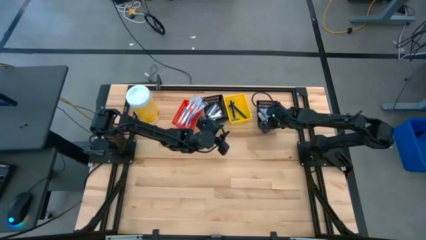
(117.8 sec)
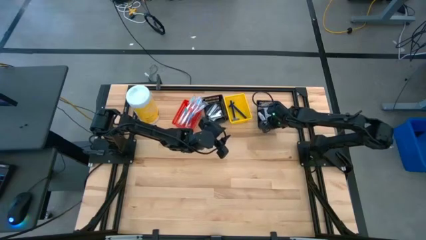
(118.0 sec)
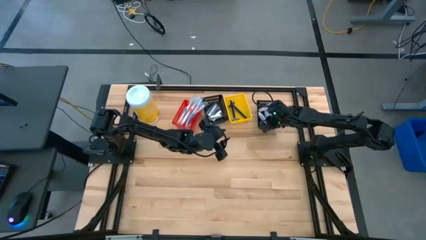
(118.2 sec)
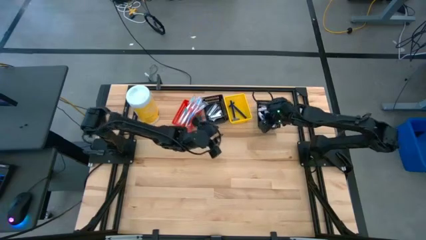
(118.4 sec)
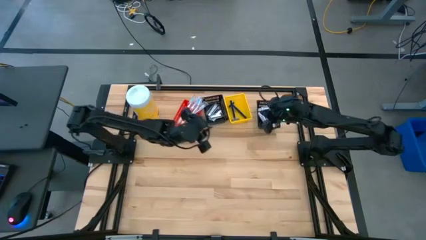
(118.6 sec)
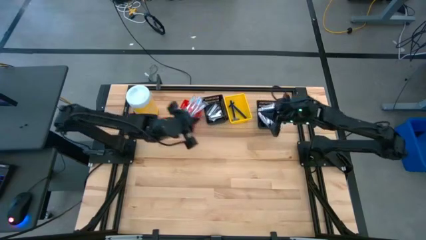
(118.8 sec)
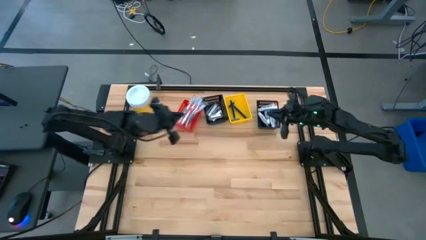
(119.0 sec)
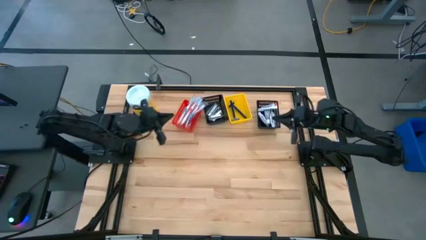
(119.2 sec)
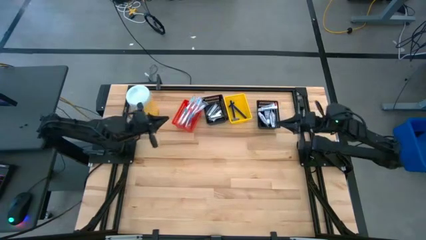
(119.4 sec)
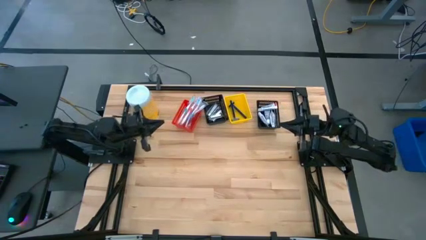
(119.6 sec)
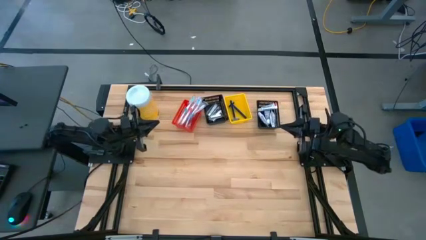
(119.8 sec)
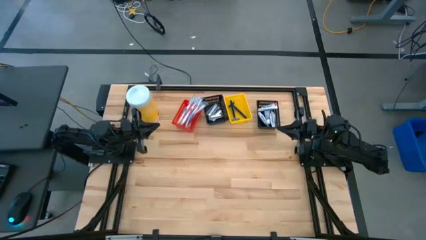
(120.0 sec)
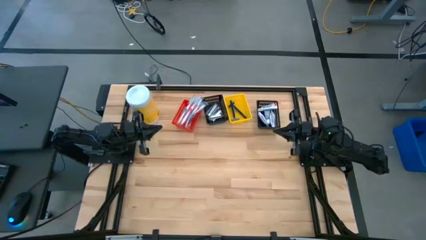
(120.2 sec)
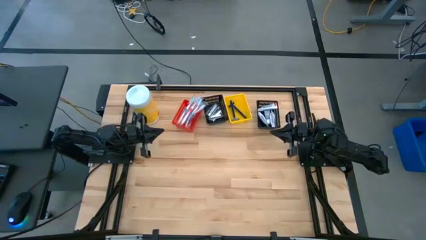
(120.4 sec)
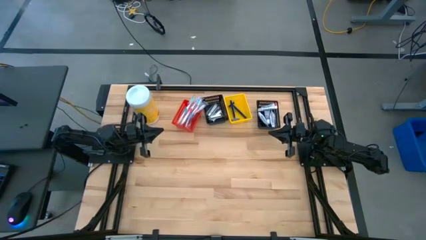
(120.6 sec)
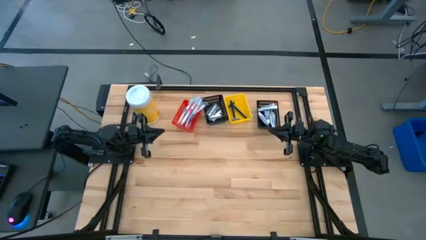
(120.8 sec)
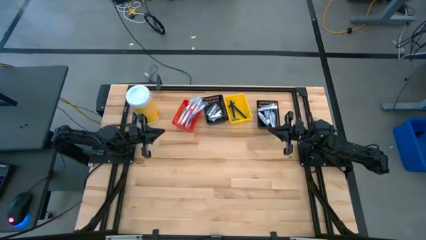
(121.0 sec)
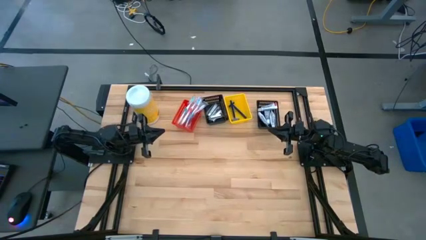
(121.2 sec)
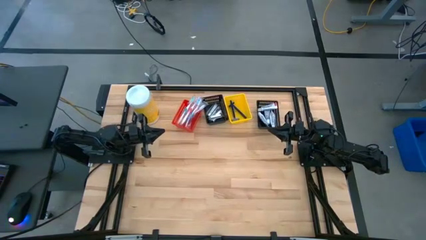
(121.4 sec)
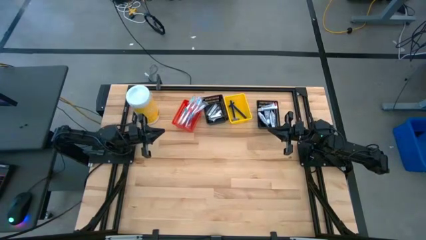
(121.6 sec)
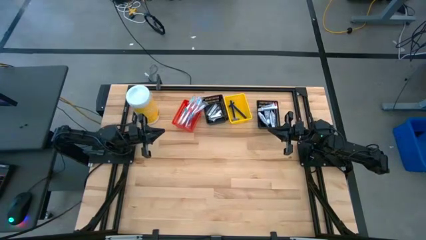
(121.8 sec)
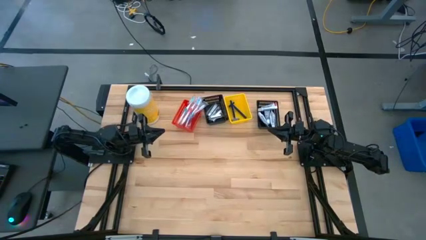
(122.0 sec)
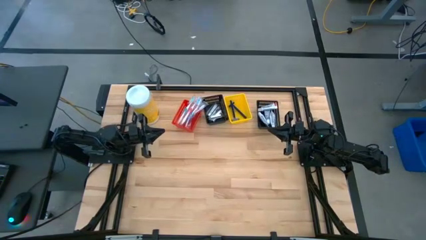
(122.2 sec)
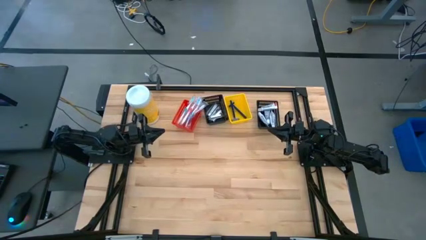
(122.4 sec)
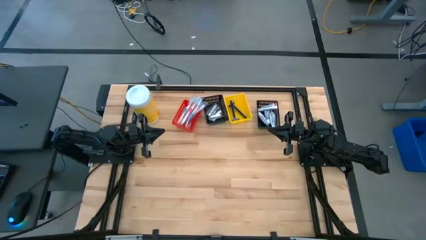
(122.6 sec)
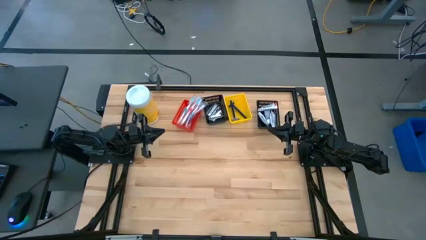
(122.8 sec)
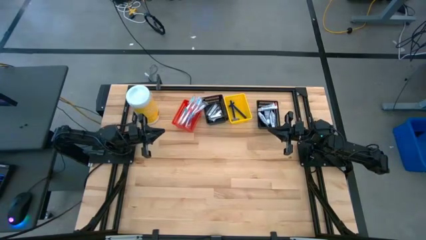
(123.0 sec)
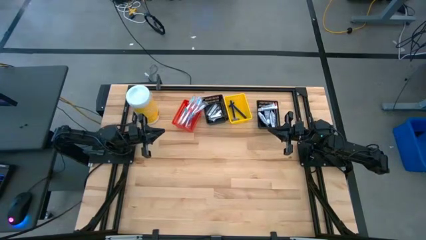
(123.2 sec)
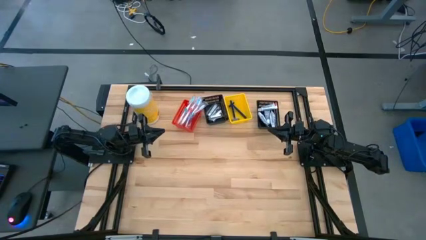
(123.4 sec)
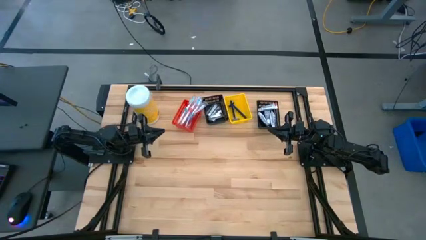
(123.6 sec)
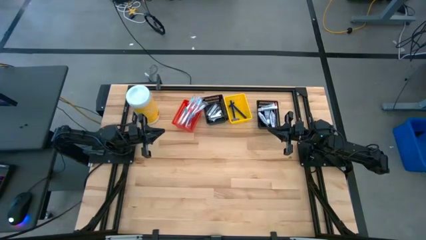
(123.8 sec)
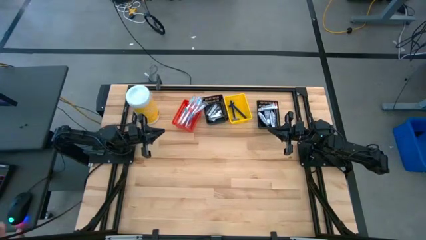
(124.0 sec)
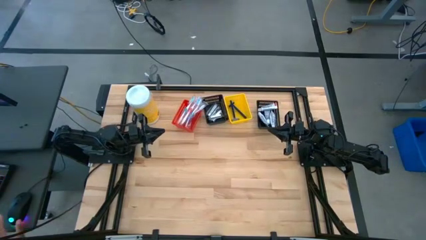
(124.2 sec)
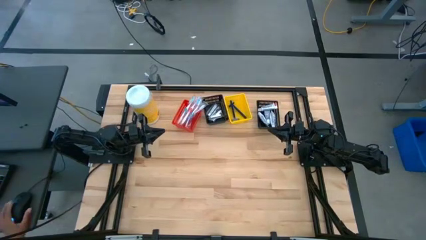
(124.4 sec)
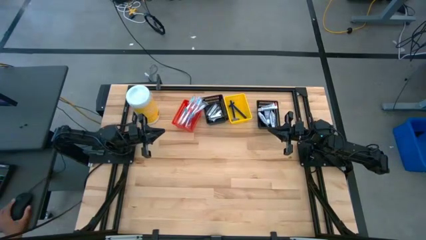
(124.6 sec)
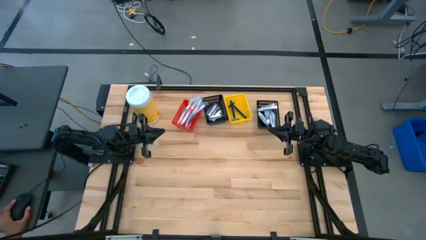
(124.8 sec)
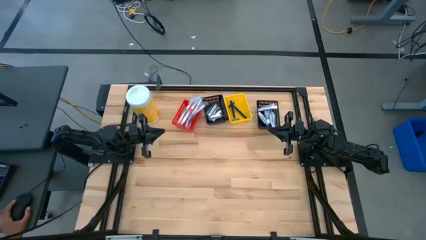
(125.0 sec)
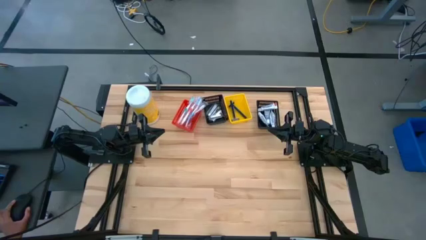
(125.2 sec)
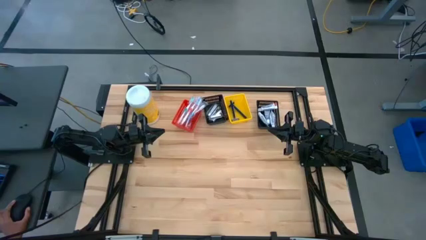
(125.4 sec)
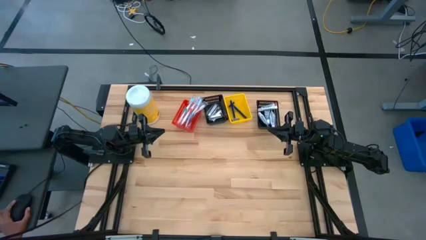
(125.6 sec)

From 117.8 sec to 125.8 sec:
Task: Pick & Place Travel size toiletries
Return to Home Position

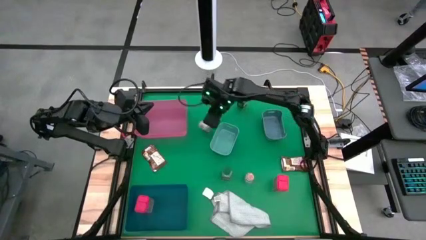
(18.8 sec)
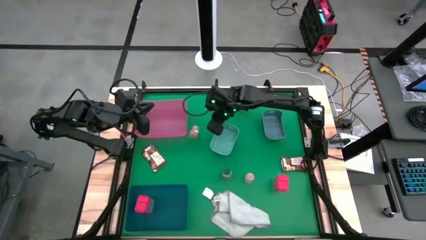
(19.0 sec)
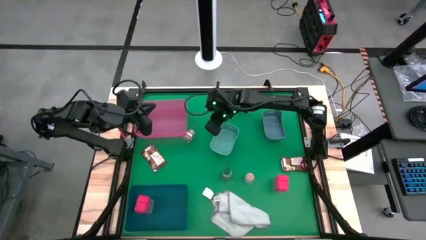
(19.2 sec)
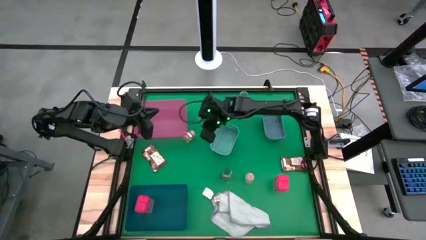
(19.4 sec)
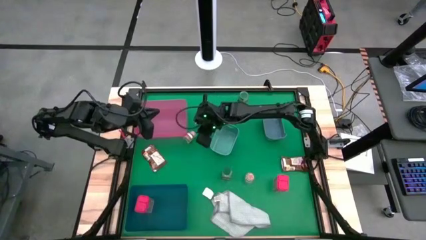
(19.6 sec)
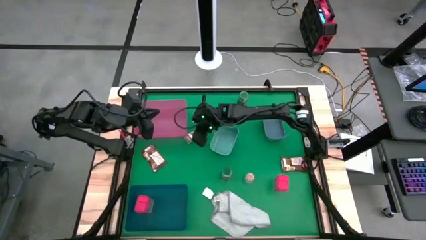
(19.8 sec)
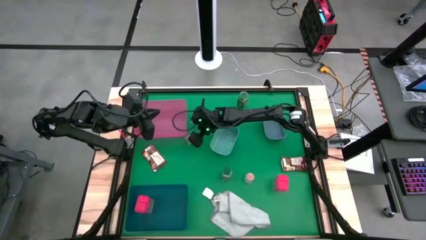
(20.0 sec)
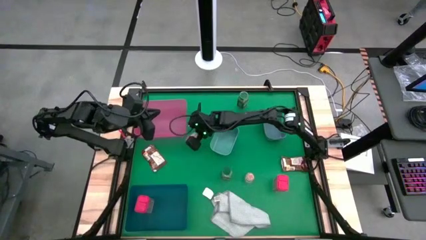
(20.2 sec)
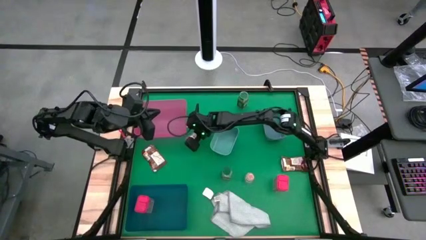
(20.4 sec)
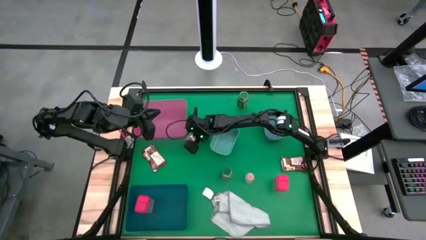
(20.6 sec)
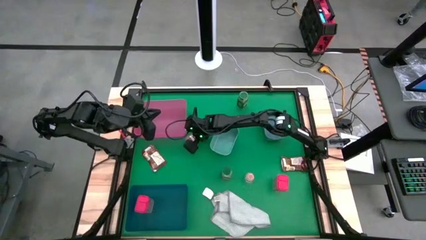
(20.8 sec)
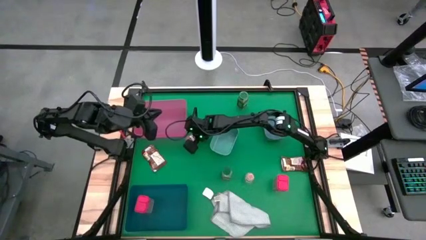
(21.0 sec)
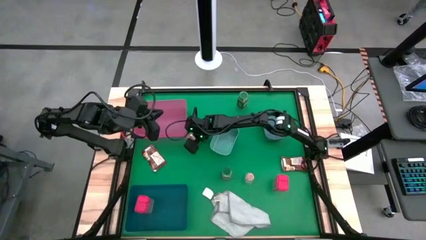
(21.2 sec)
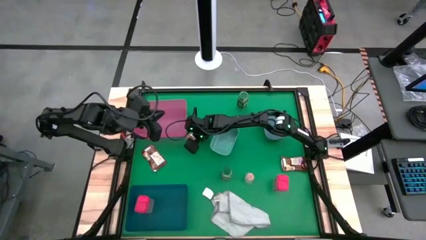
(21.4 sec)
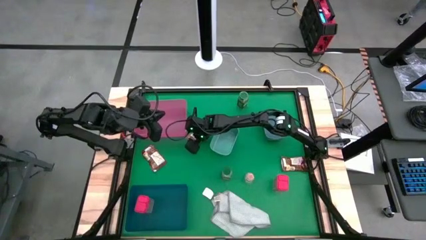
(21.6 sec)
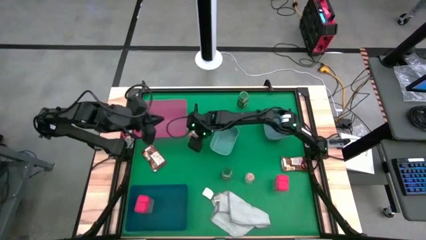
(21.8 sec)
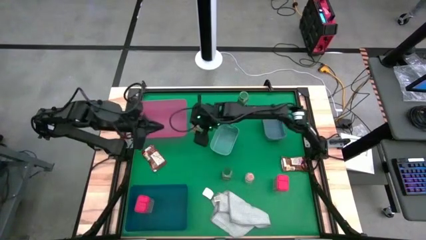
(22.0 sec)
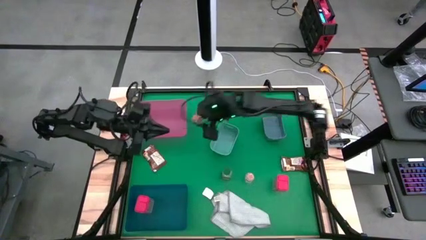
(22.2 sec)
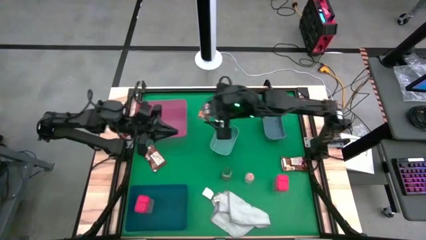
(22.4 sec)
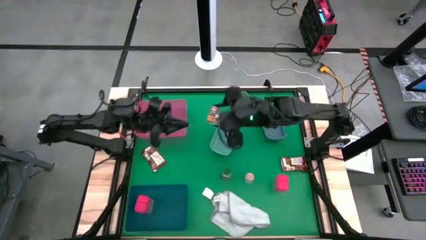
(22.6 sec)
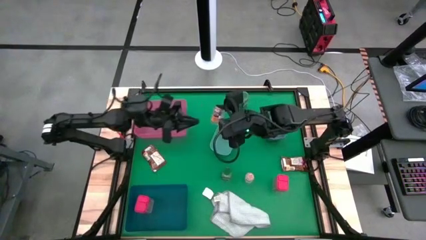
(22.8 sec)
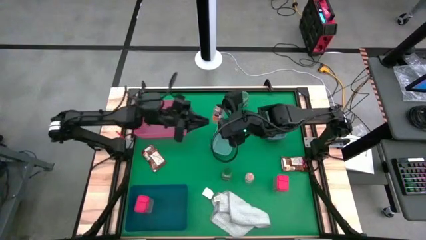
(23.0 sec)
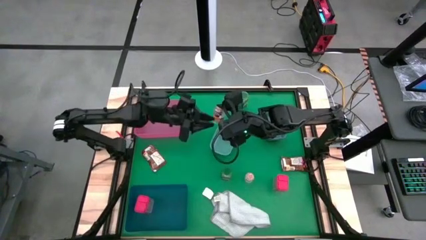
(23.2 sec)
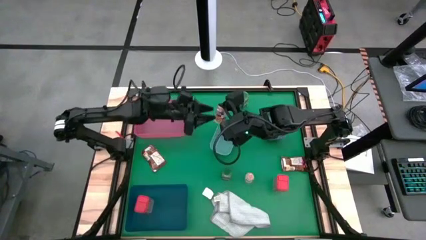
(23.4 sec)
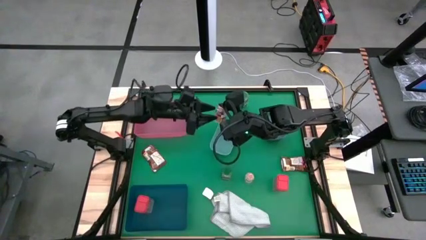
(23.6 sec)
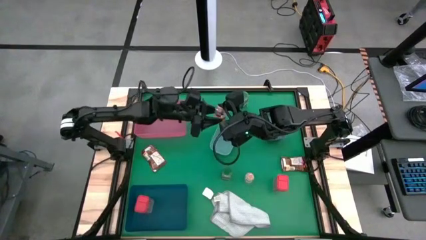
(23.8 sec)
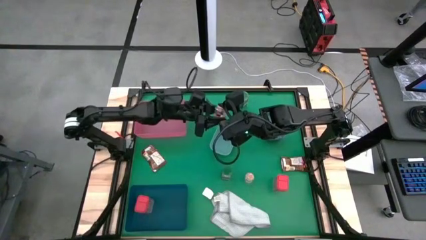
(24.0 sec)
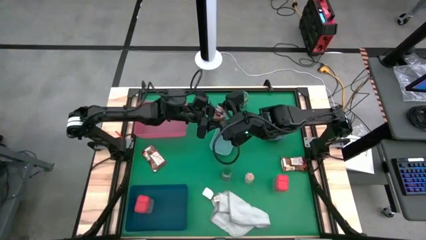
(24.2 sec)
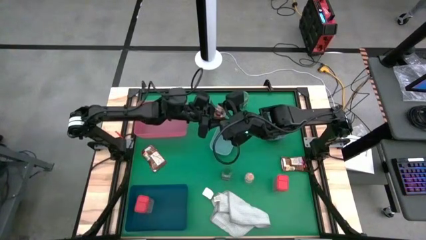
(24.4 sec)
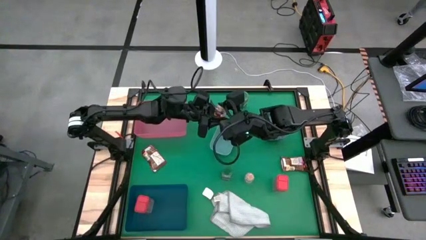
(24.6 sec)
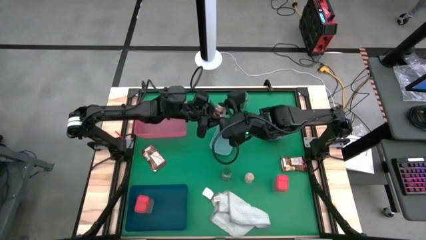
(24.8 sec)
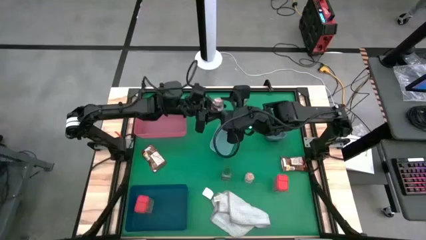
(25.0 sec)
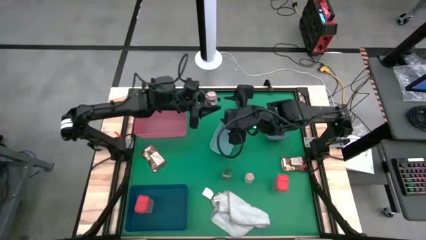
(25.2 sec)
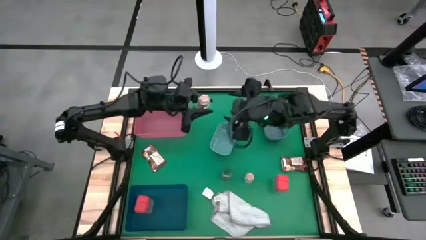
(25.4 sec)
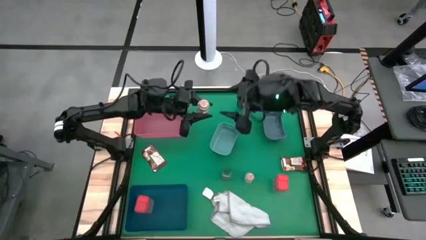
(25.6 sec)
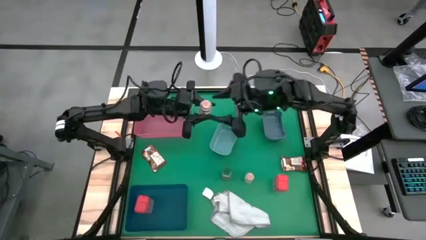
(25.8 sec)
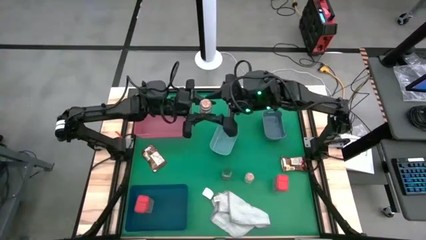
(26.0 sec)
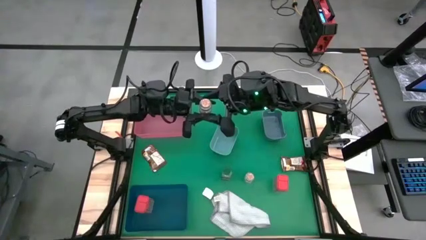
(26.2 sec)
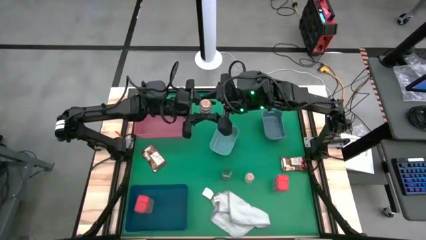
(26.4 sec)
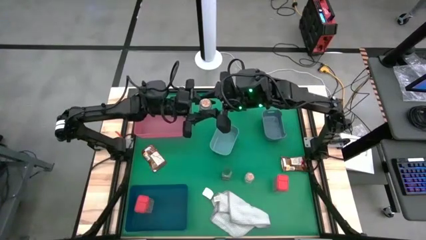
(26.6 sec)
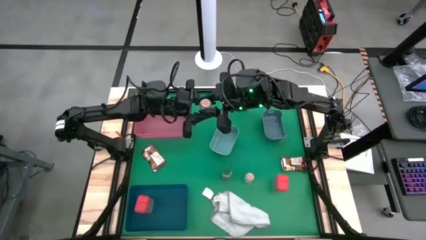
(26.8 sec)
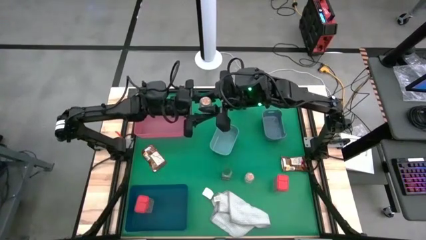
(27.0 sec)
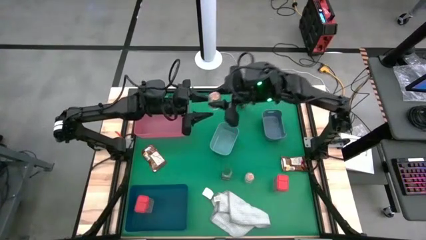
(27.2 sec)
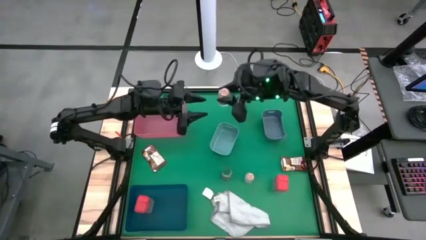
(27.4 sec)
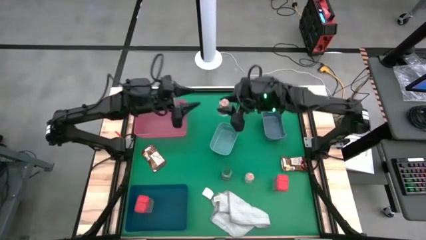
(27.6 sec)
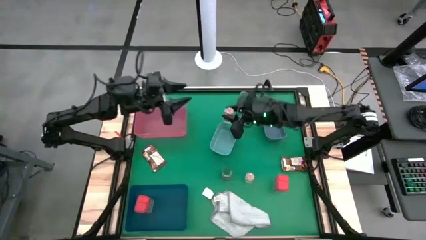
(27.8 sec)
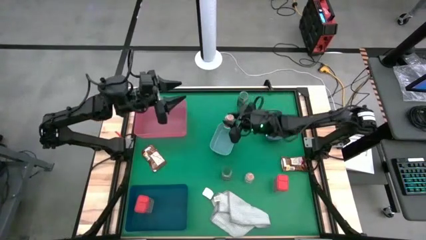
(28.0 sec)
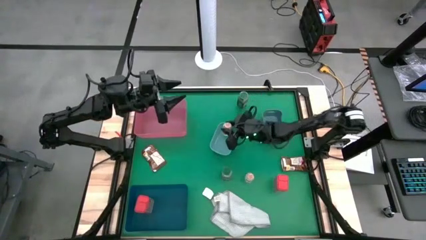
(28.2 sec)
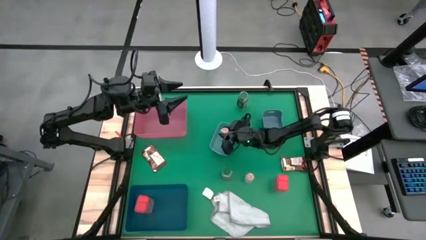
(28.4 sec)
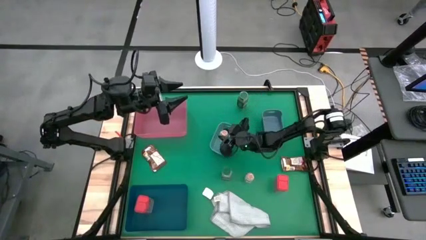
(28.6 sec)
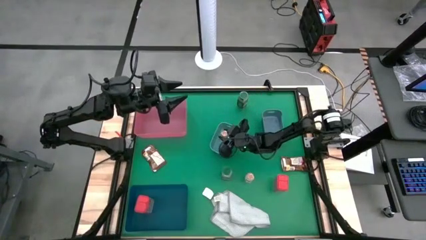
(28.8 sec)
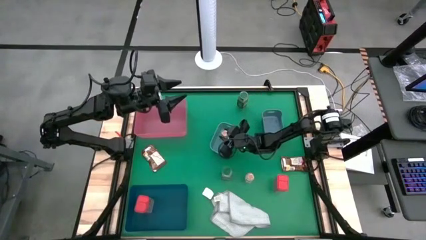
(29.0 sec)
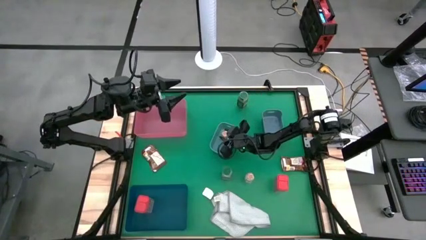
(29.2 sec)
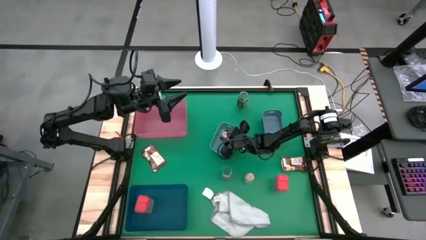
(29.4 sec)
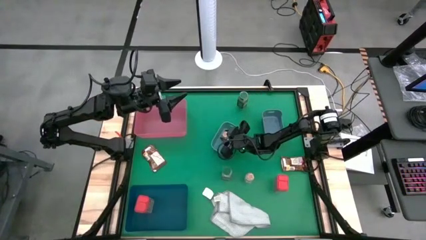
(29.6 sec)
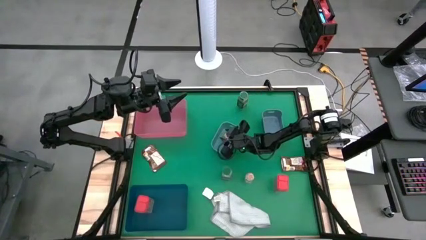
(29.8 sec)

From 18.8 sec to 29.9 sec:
Task: Sort spices by type
Put the top brown seasoning bottle into the light blue bin
